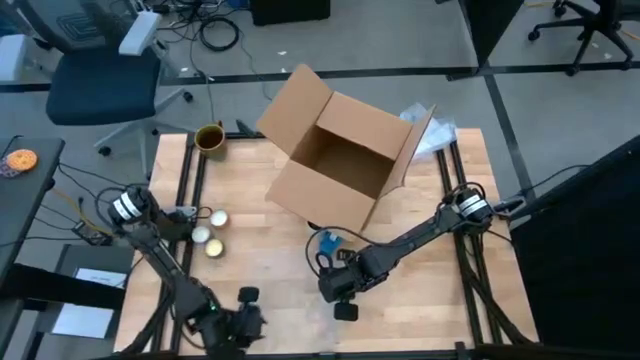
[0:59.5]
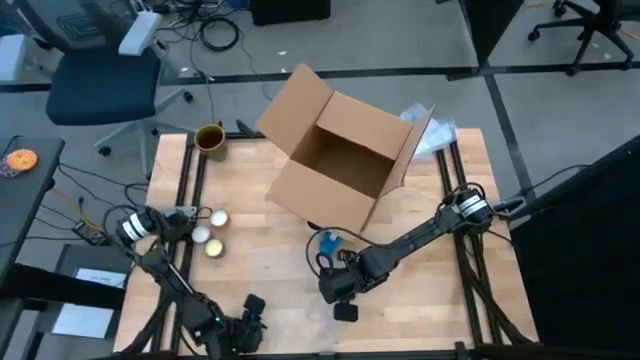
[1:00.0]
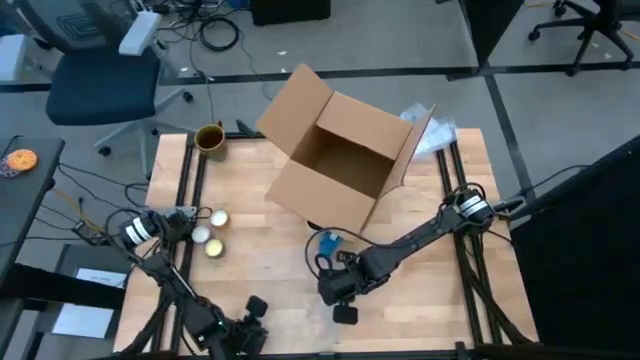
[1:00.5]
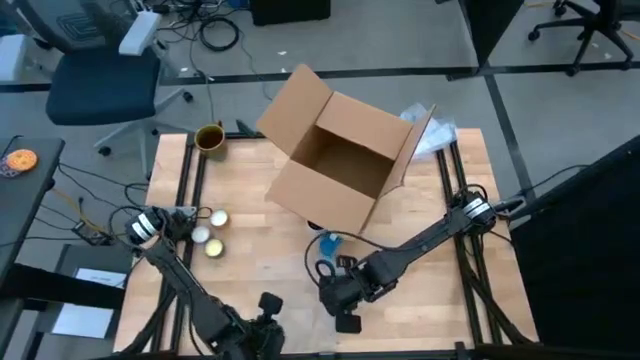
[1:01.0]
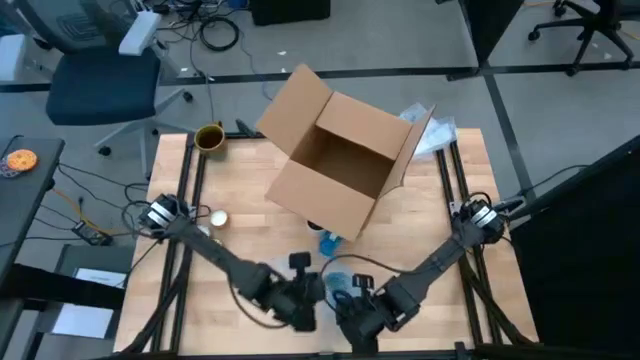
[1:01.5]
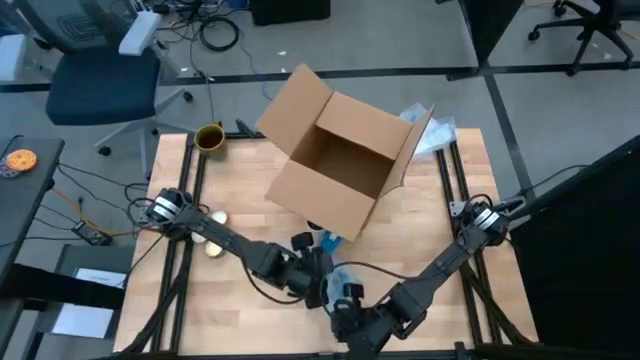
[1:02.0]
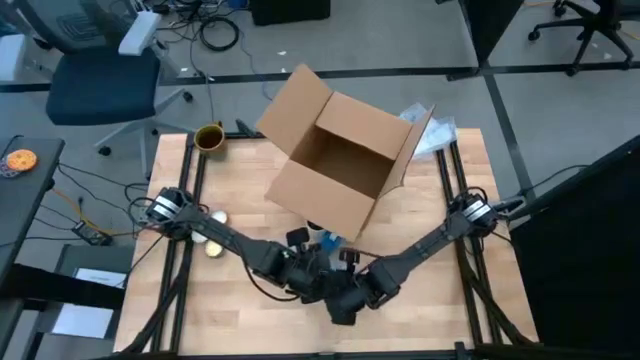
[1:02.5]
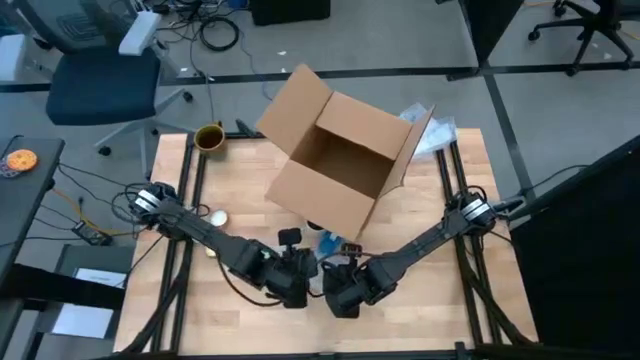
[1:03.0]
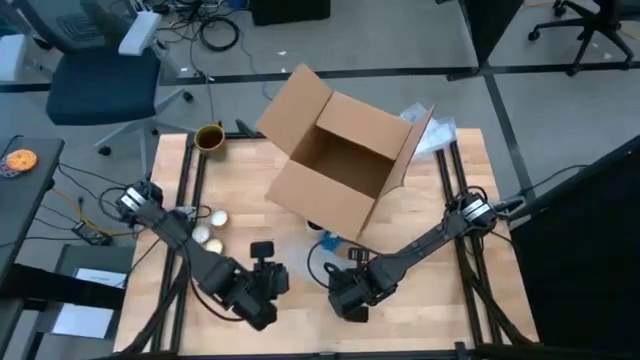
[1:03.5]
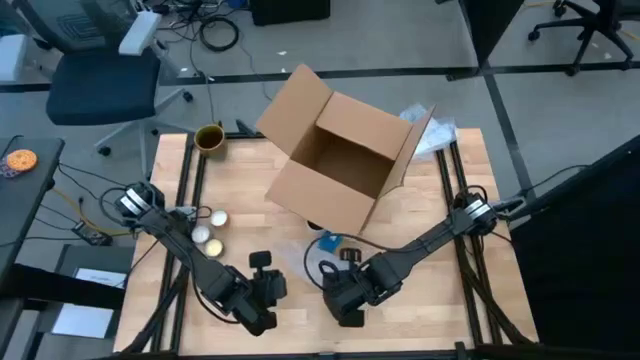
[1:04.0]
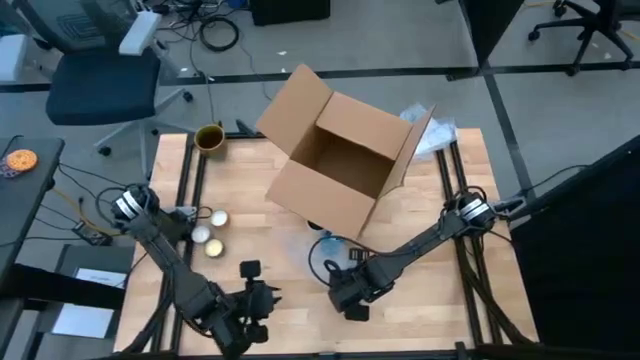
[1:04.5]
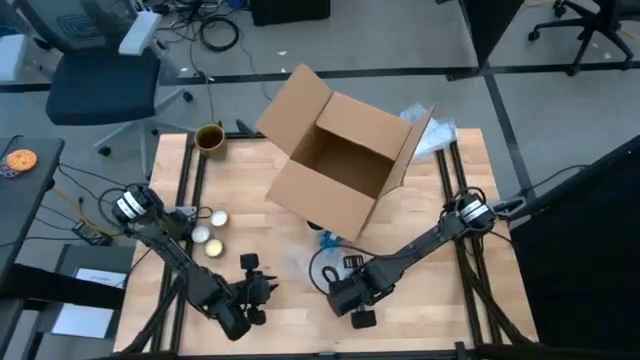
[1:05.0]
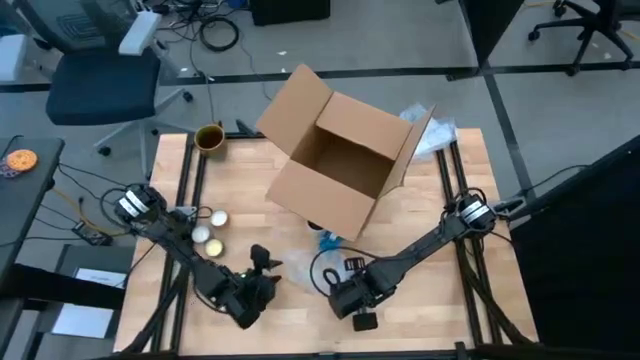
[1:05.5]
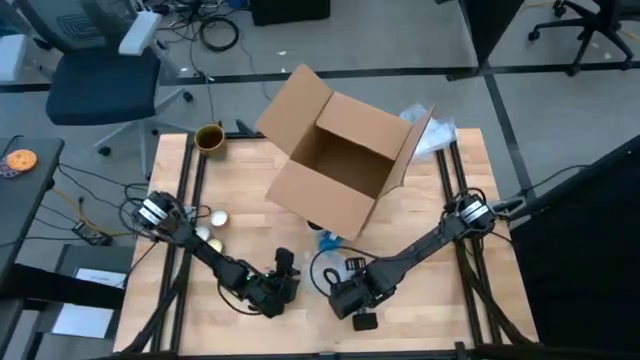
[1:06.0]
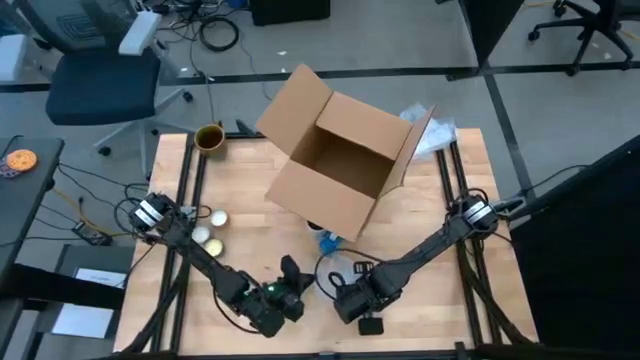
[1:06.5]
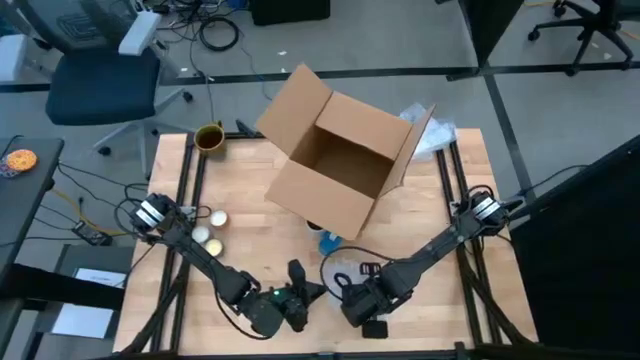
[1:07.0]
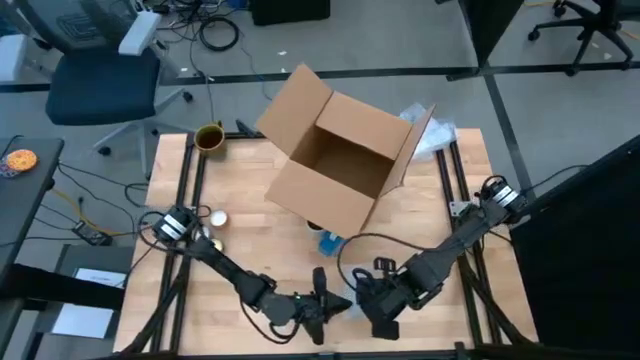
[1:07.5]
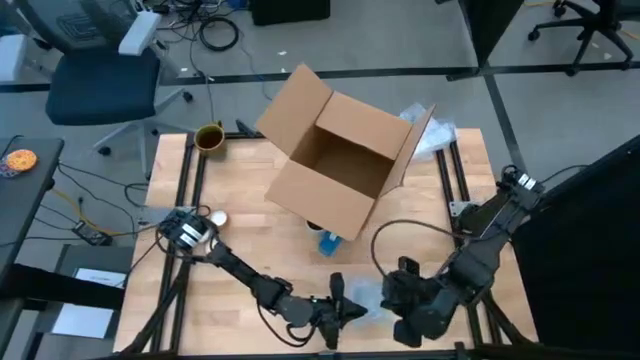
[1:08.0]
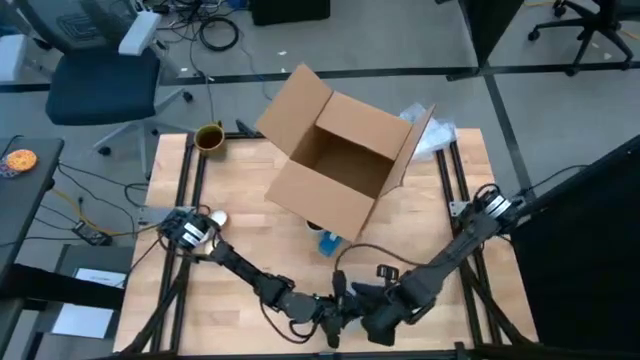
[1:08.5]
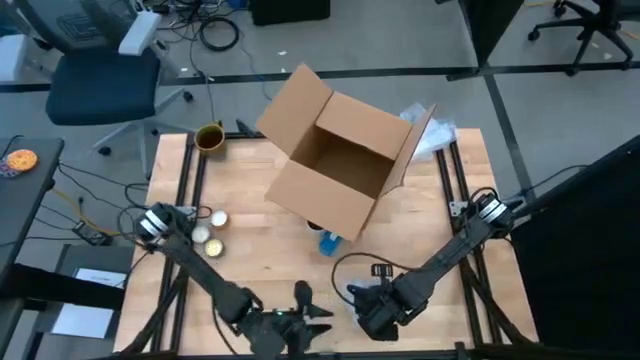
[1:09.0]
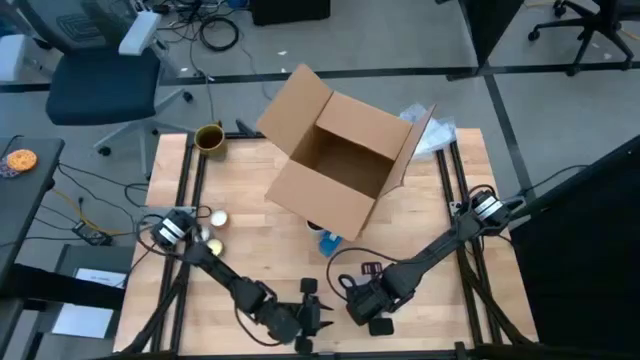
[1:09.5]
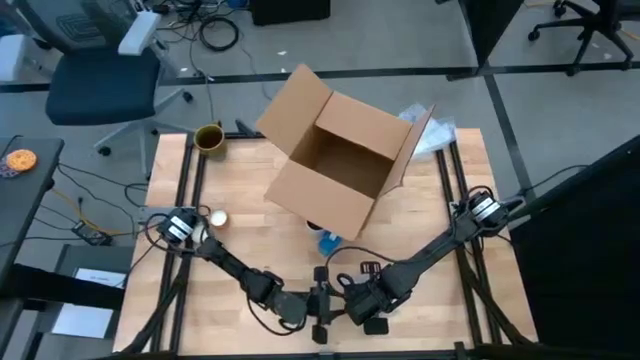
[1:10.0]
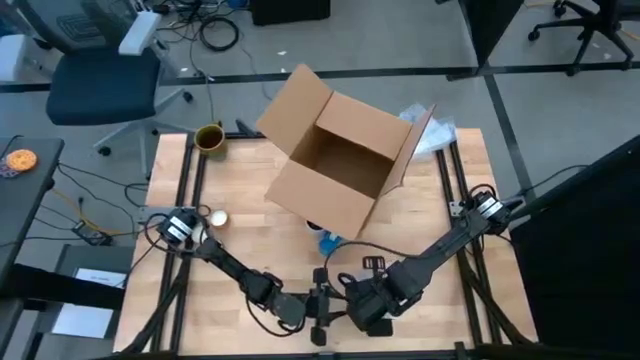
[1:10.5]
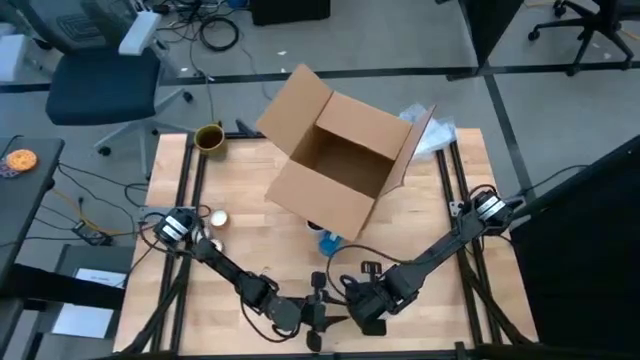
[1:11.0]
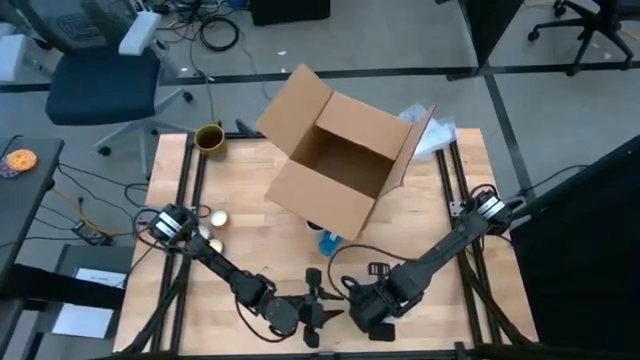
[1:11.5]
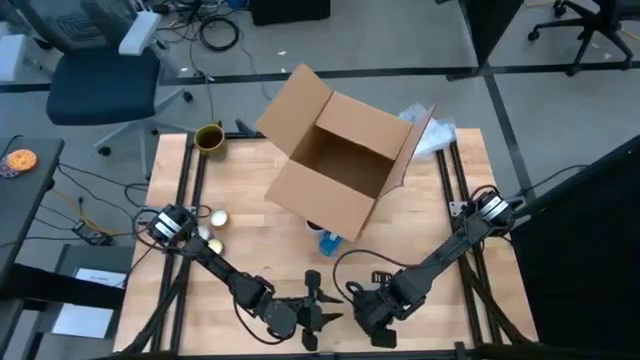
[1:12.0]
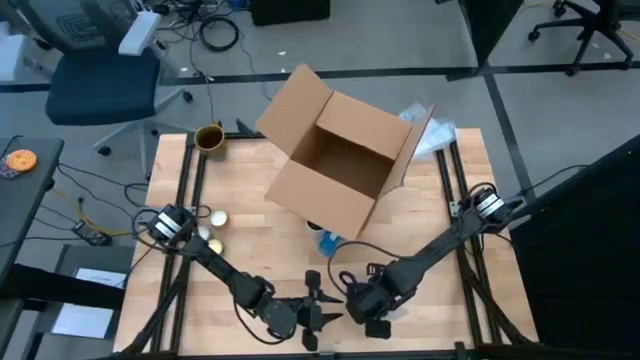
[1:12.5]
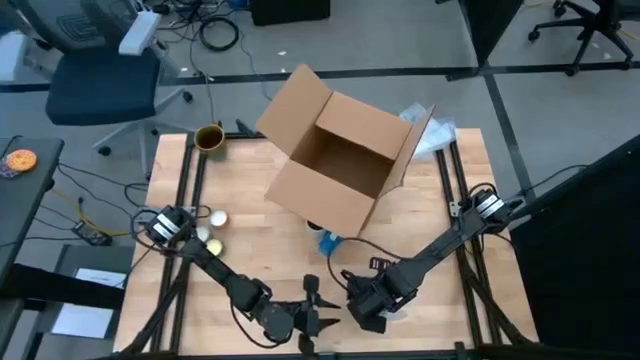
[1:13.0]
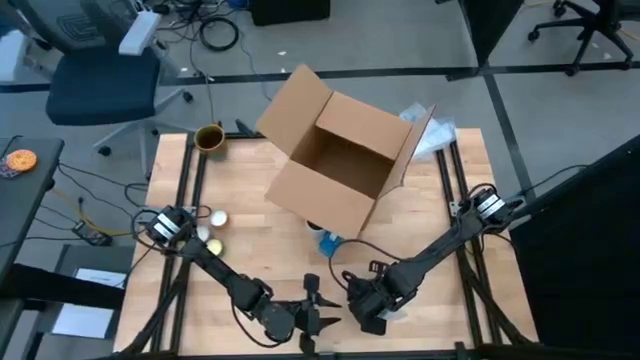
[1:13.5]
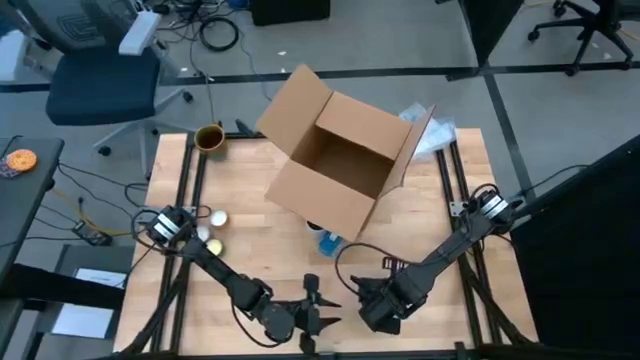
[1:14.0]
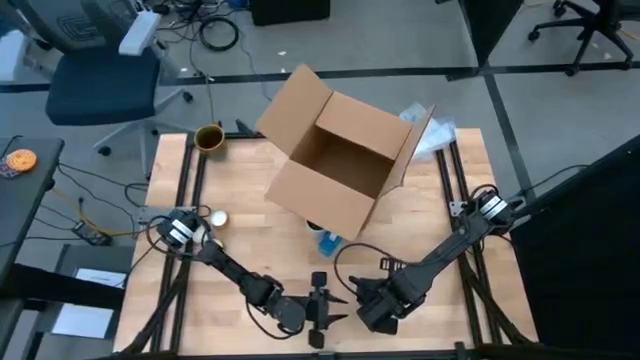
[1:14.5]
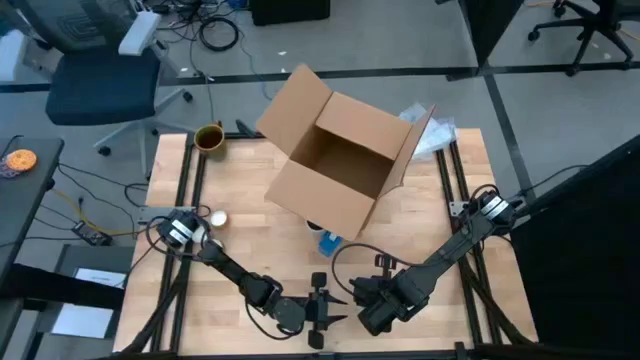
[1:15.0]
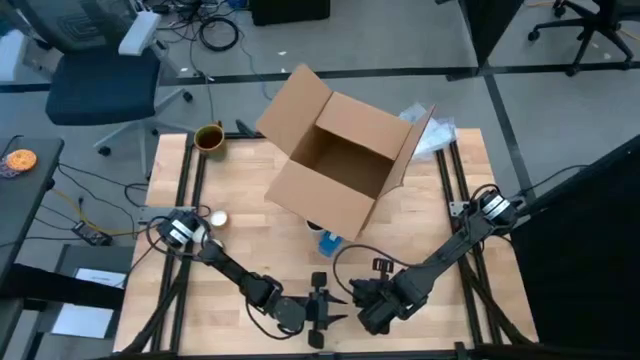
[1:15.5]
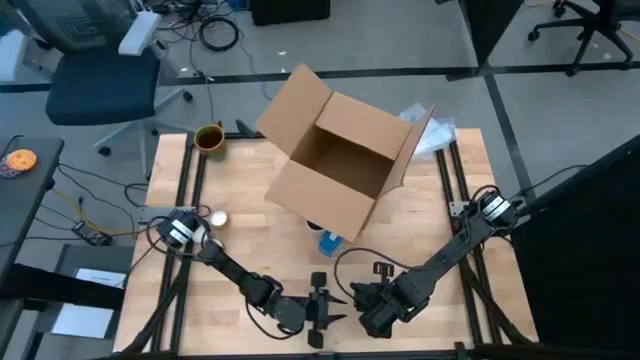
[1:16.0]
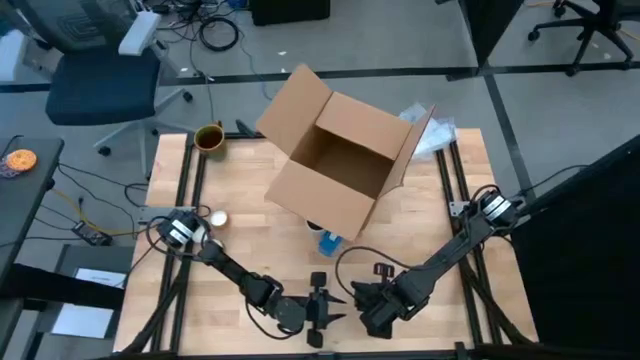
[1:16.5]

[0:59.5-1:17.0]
Task: wrap mug
Wrap the blue mug with the bubble wrap on the table

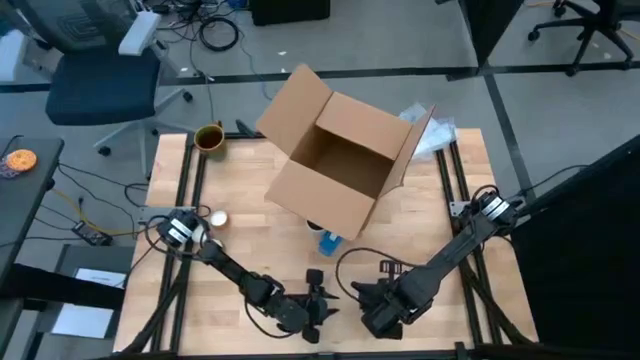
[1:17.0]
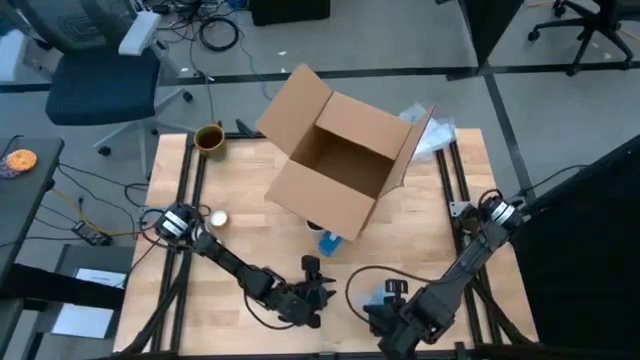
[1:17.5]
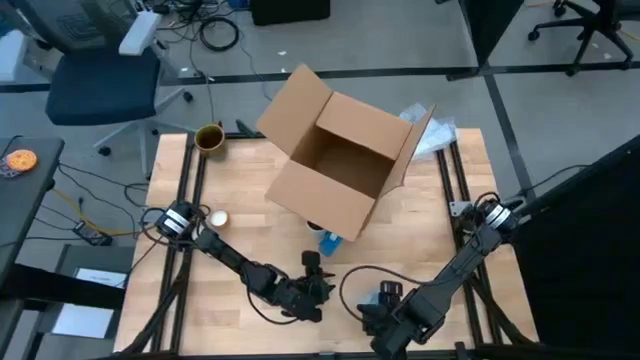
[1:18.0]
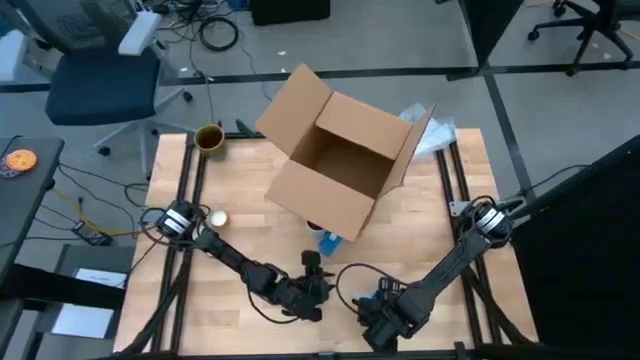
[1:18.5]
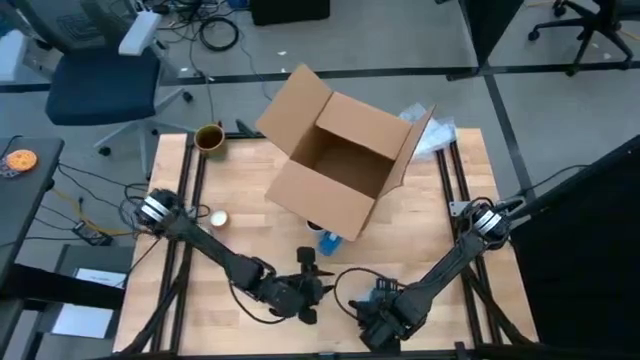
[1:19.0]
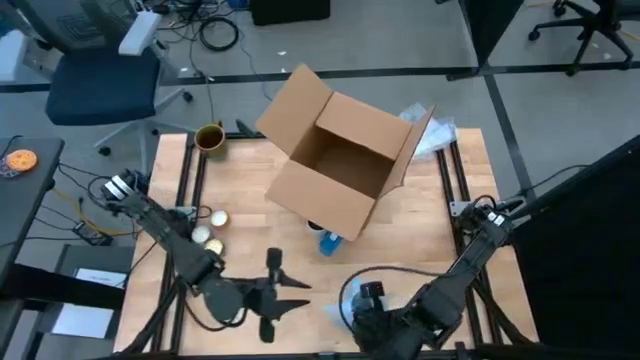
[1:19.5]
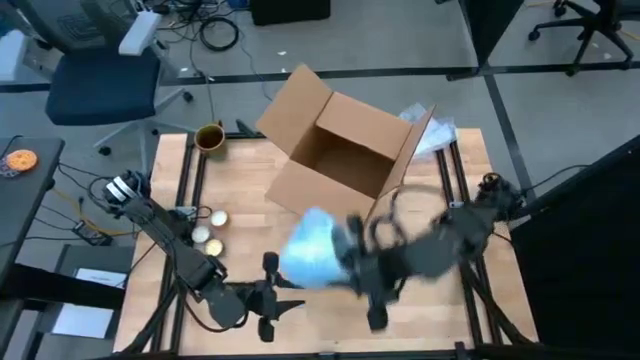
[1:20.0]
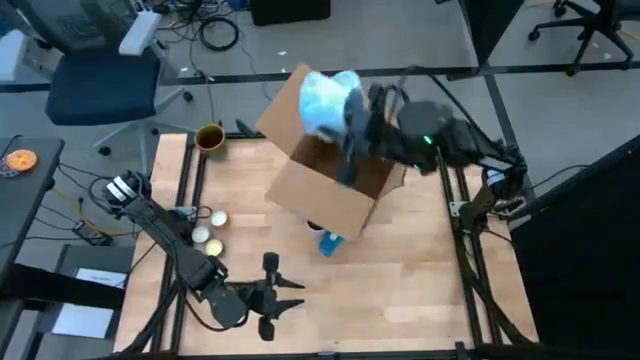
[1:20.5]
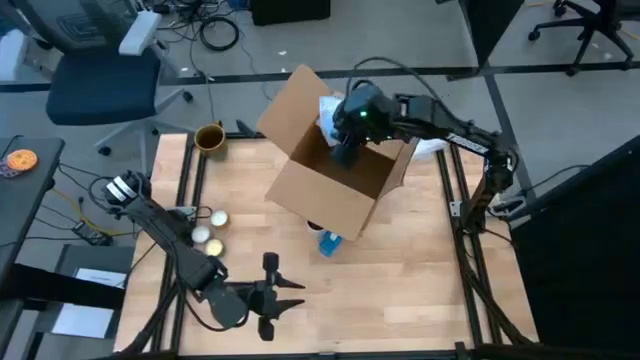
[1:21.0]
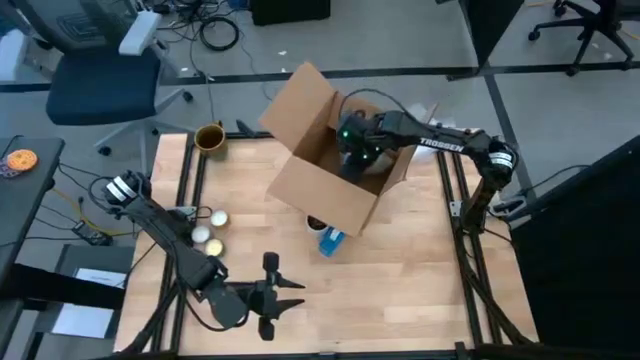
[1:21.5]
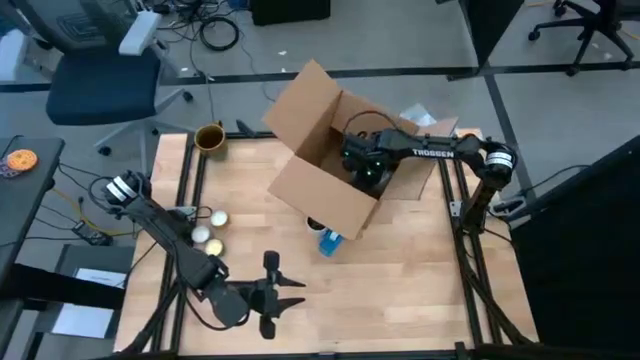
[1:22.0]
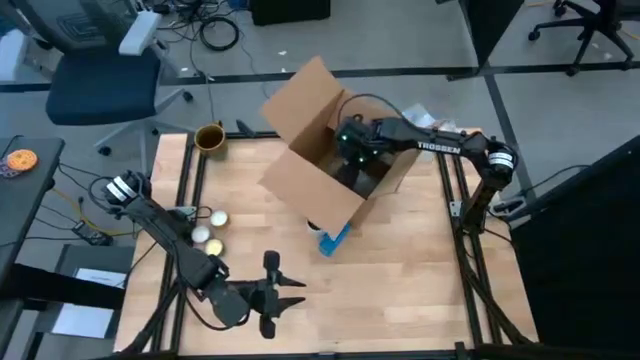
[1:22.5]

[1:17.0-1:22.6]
Put the wrapped blue mug into the cardboard box
